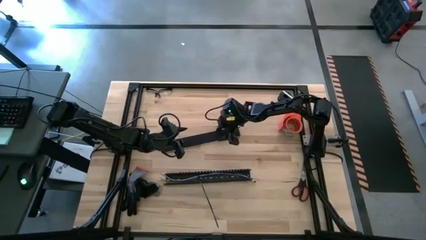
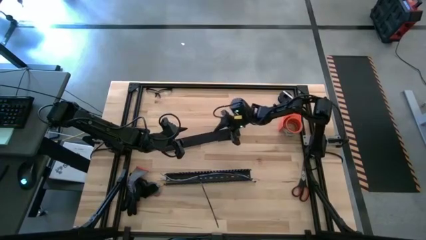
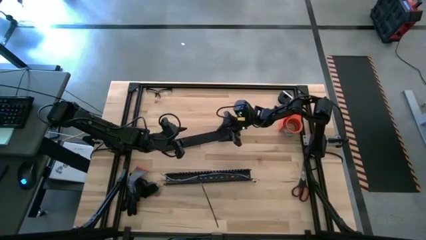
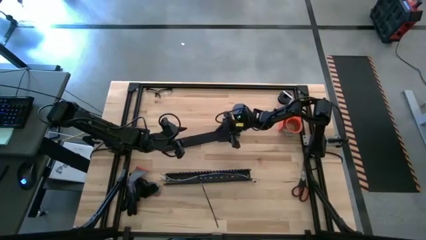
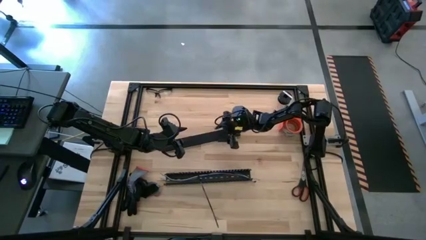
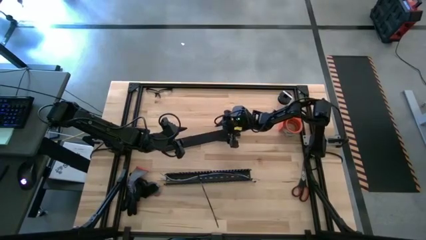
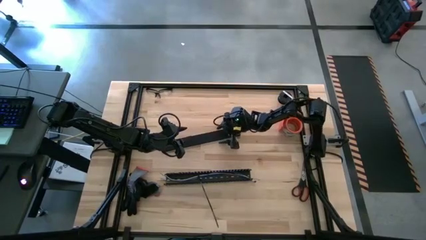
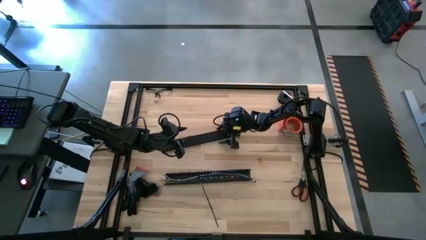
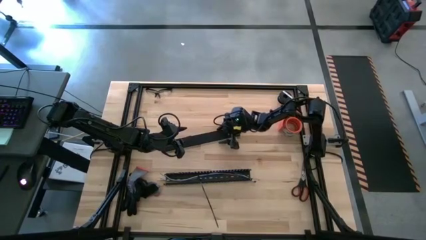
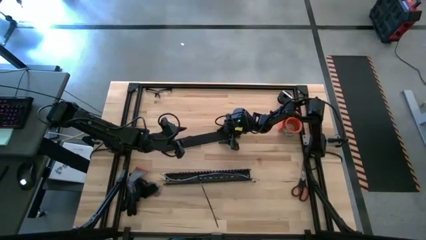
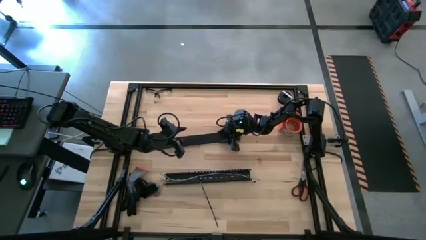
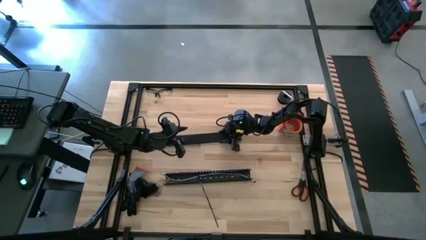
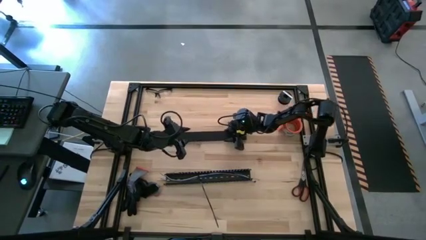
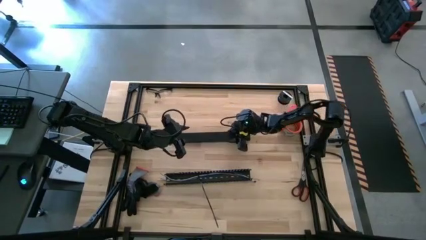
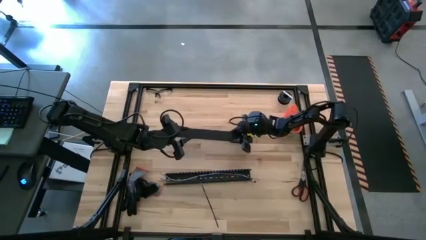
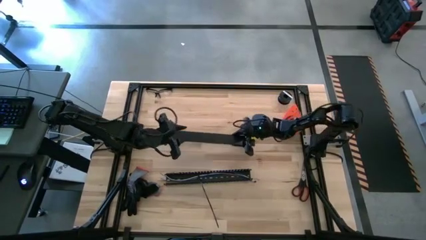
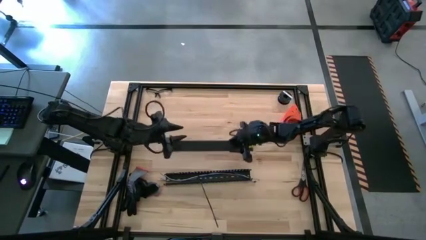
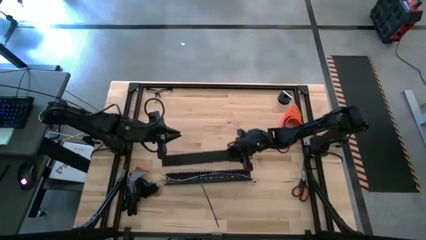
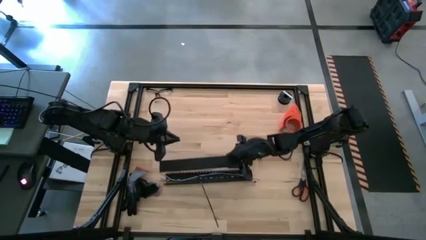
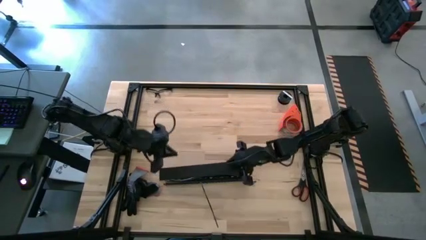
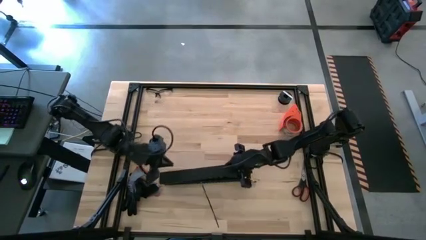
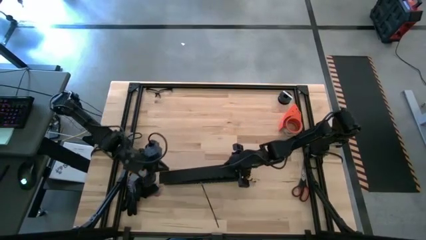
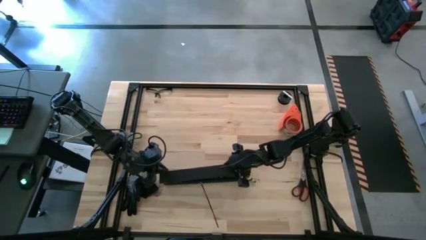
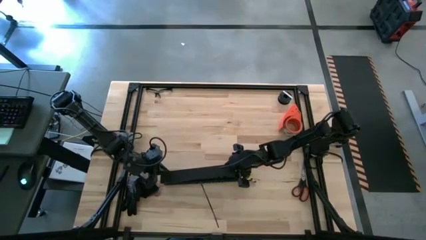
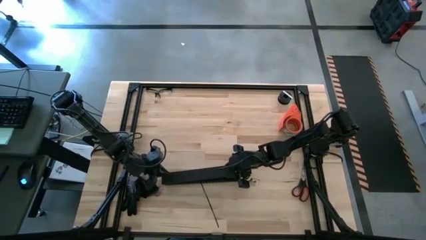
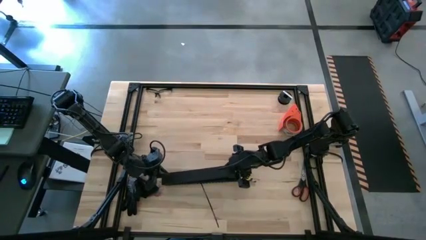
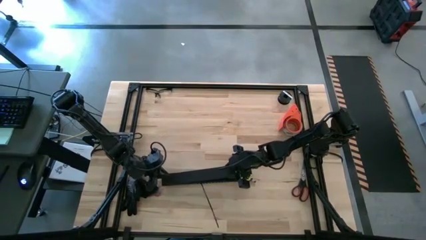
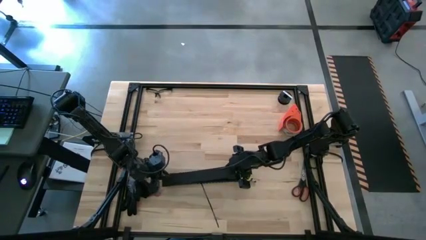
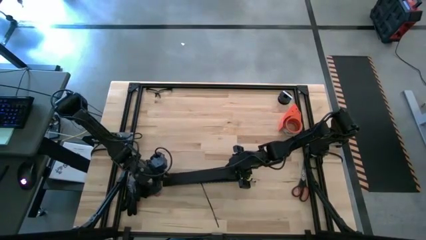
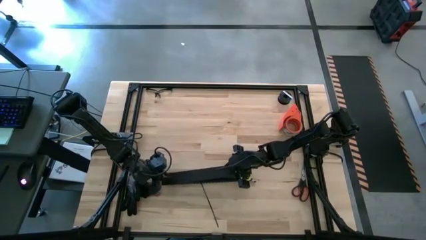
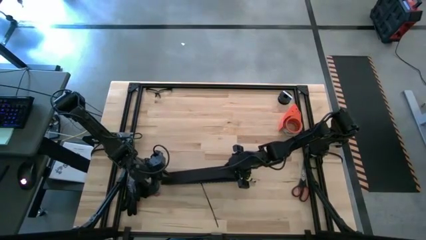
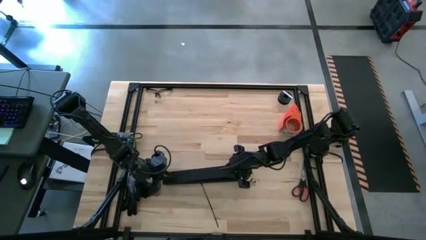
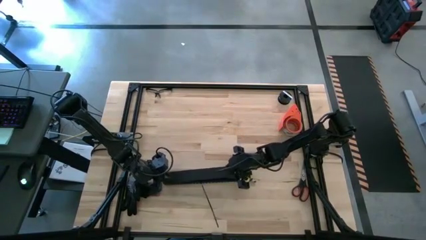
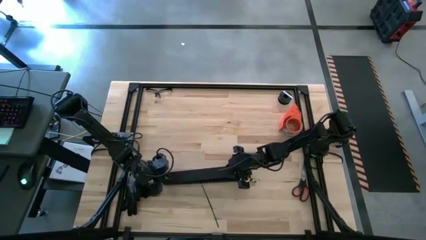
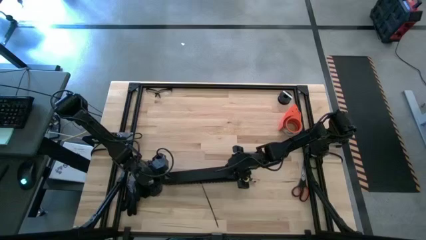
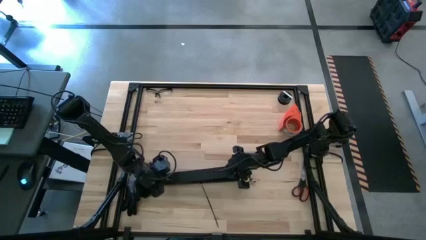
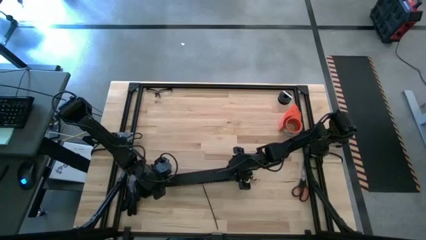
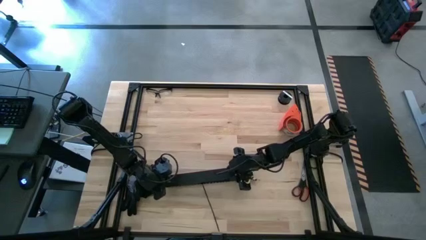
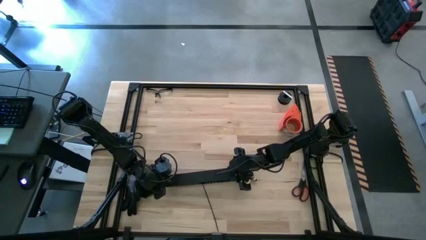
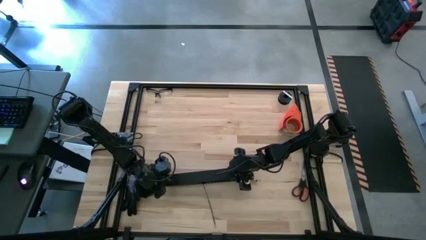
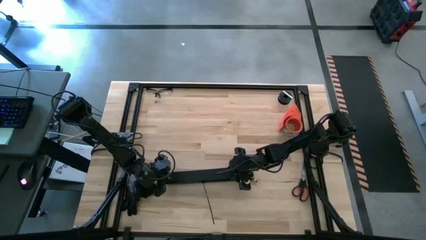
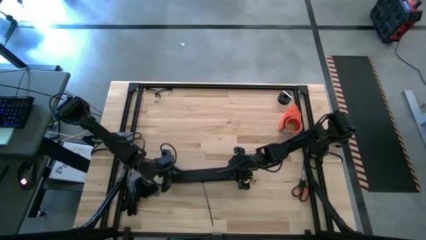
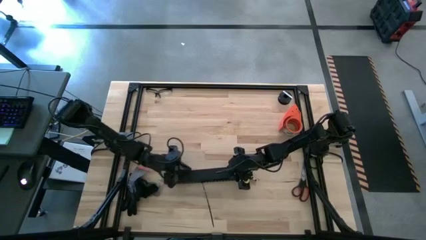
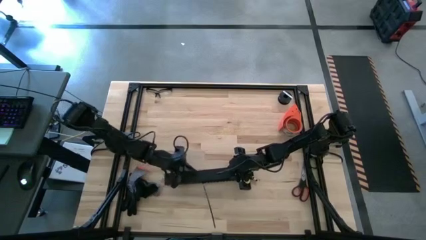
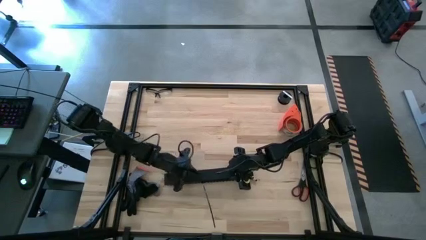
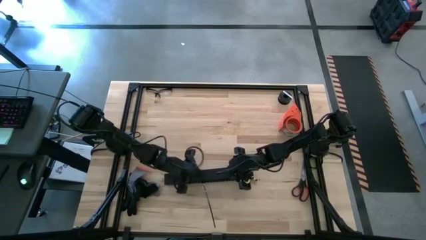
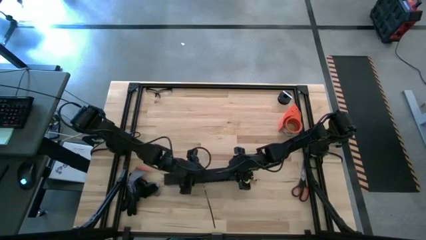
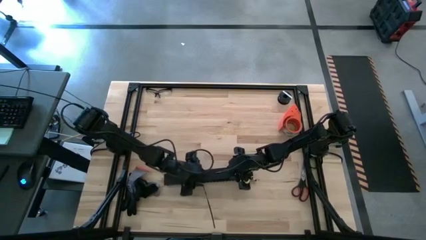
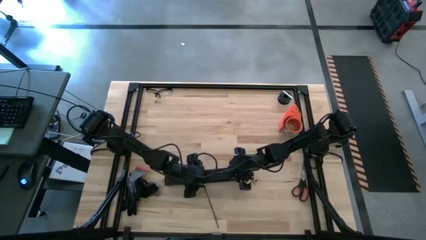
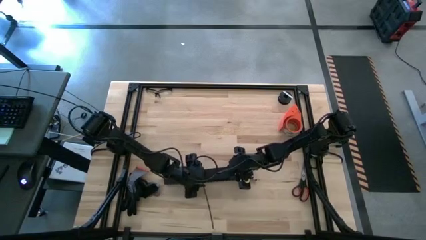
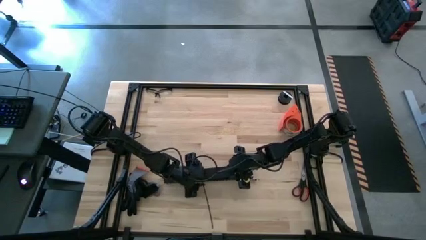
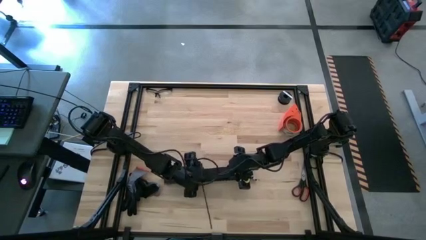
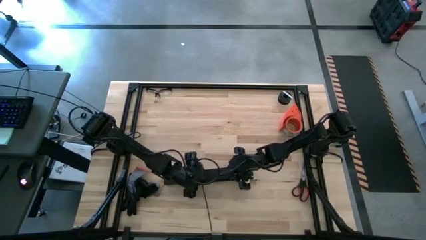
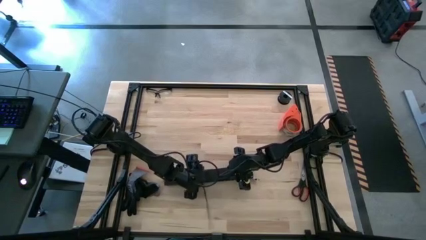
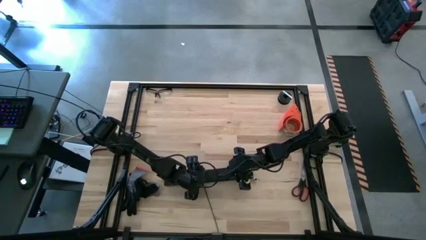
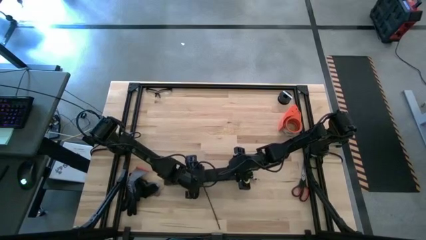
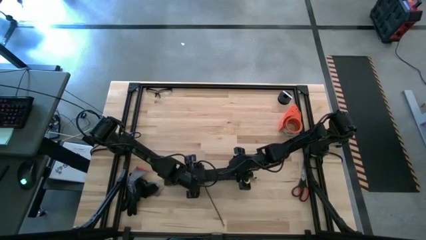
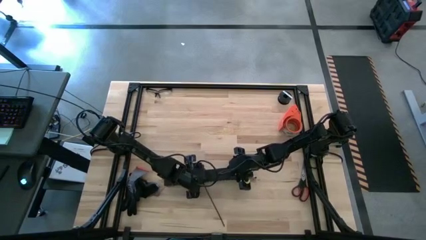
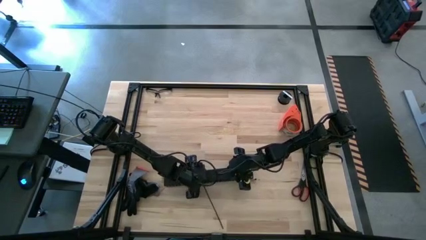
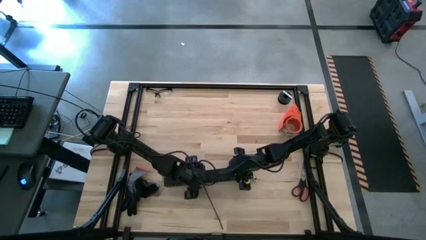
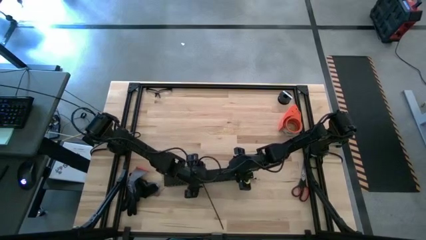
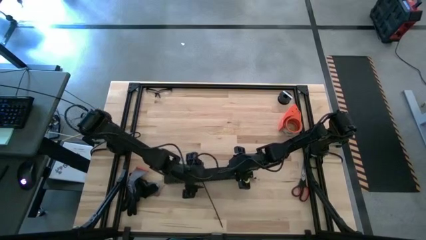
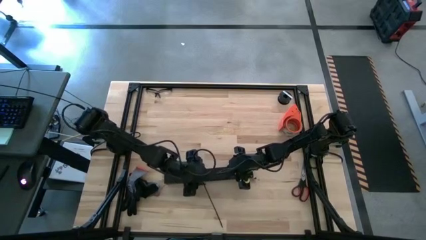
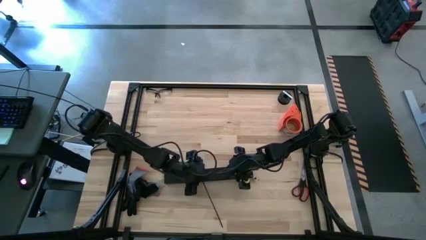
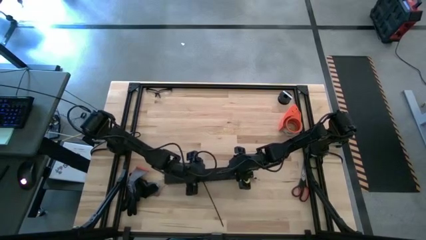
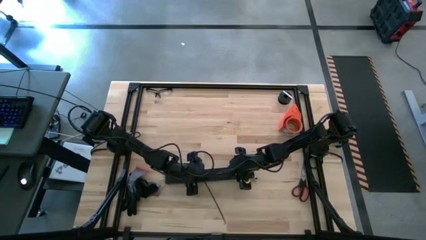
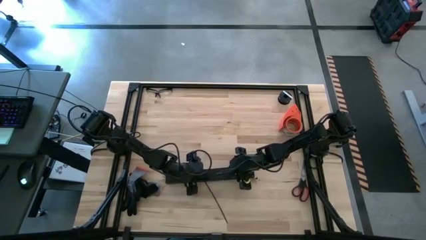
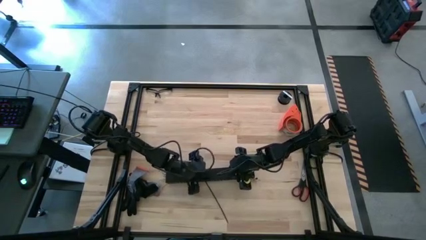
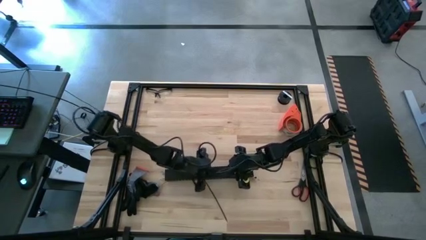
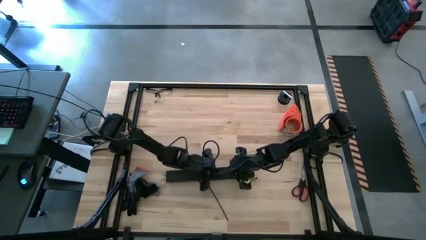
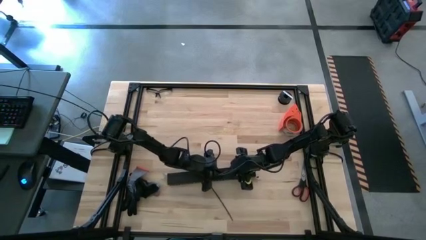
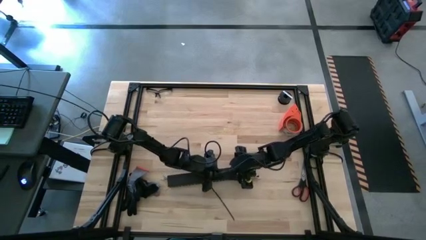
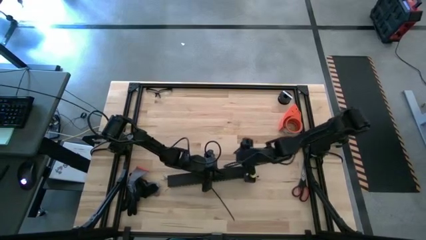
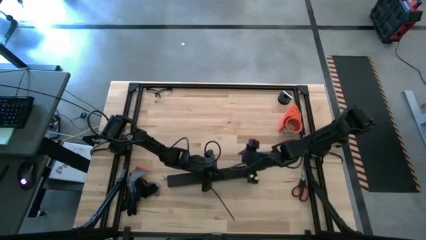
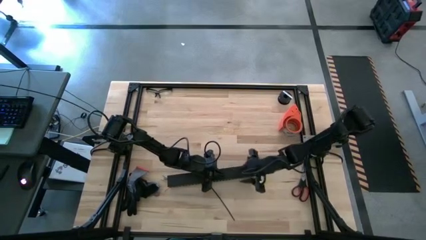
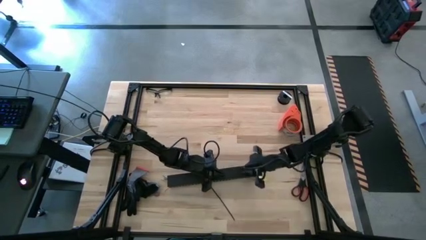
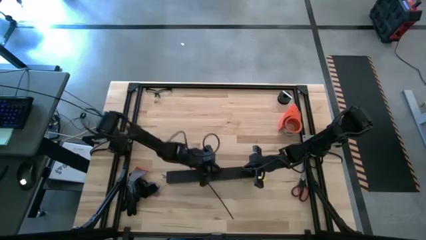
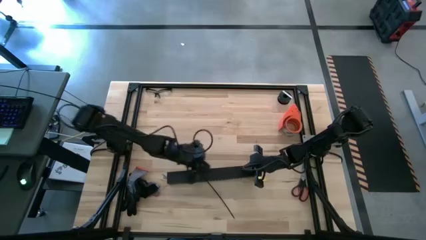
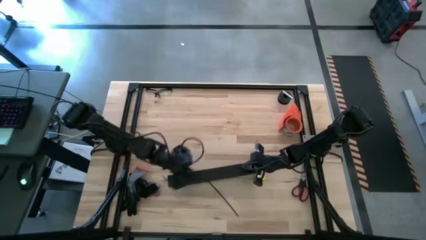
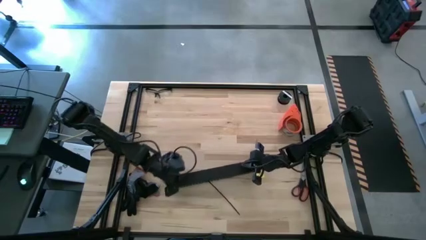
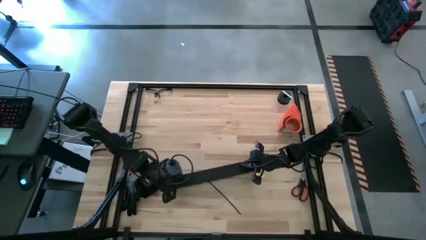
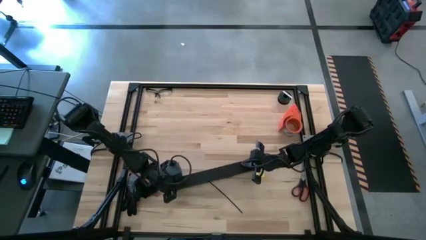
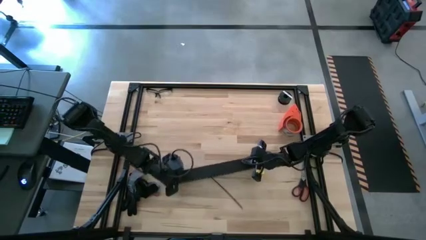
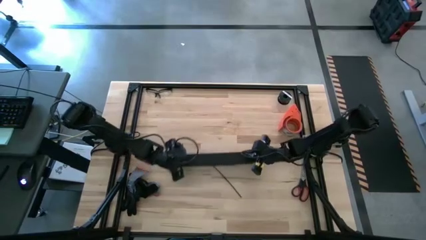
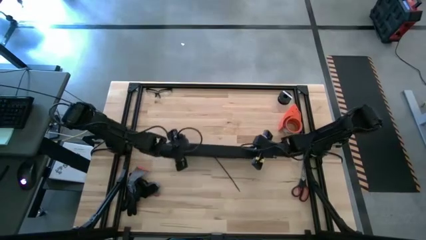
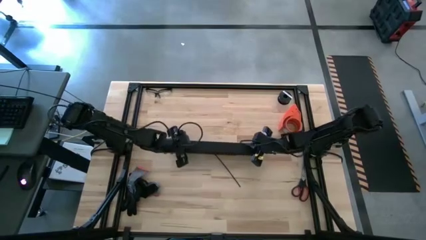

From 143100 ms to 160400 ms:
Task: Ziptie cables
Close the black cable duct with a black cable duct lid

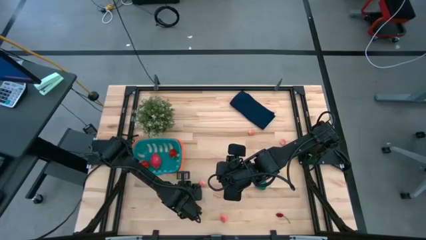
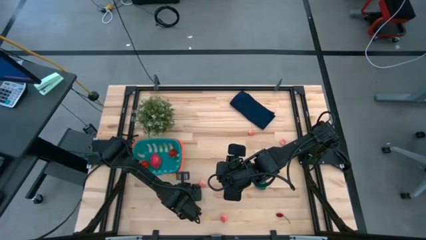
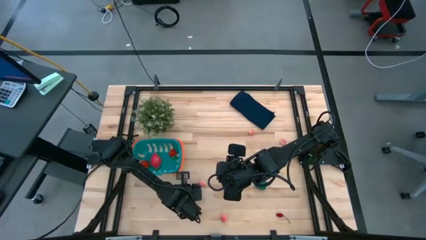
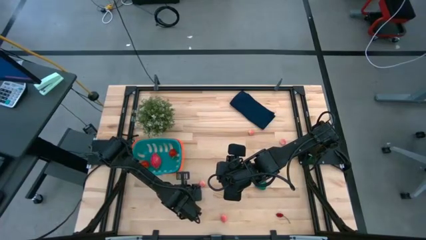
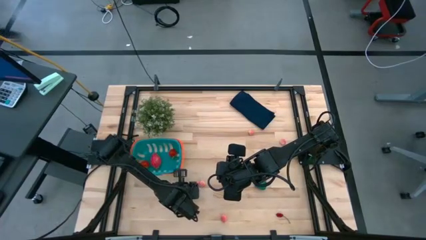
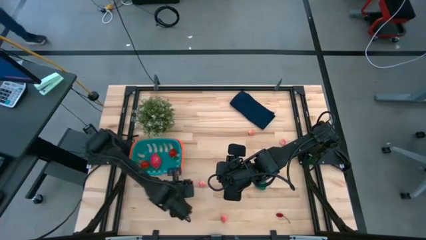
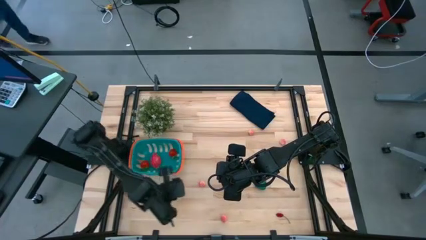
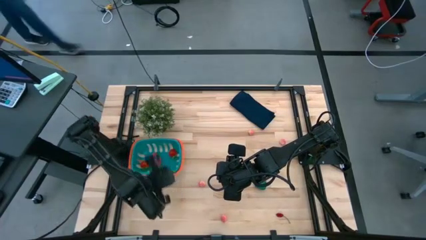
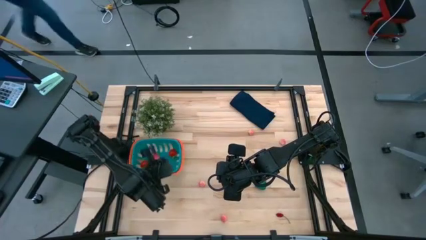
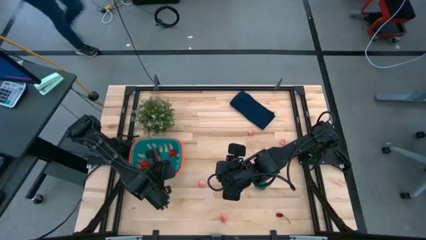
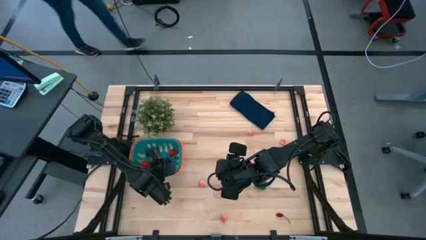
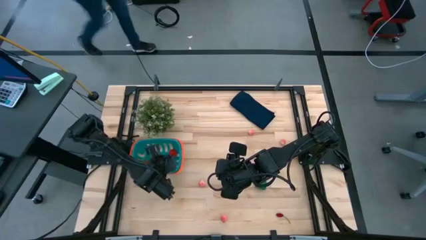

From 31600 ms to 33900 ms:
Task: Pick and placing Produce into tupperware
Put the red cherry into the green basket
